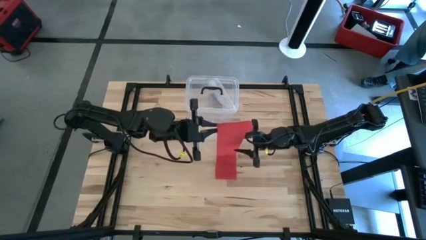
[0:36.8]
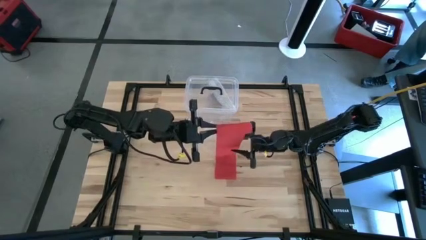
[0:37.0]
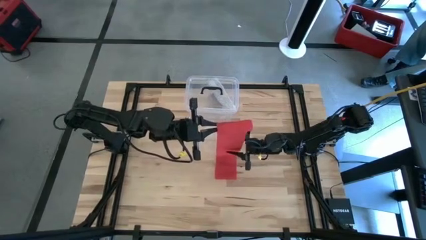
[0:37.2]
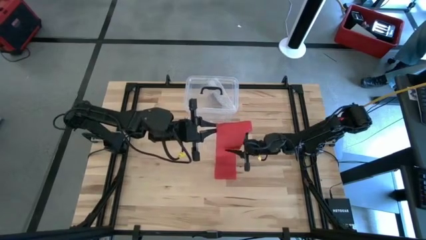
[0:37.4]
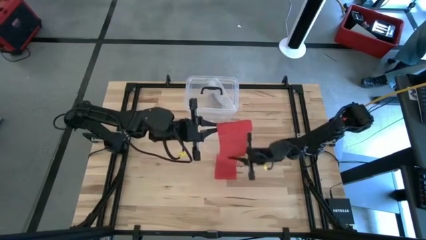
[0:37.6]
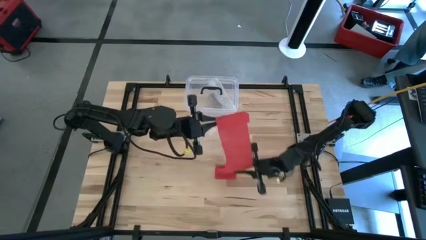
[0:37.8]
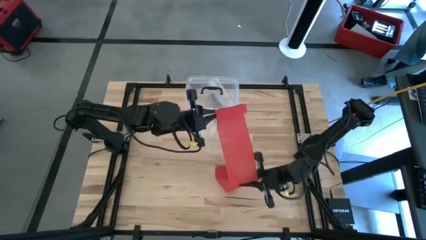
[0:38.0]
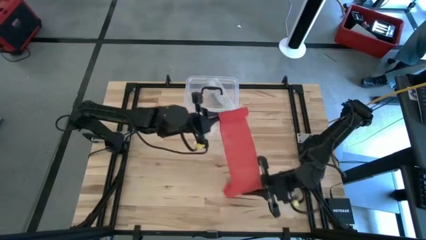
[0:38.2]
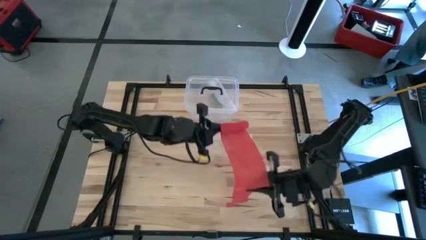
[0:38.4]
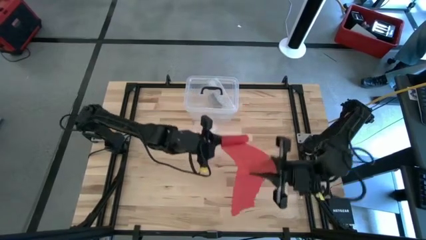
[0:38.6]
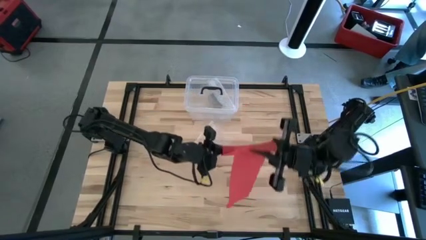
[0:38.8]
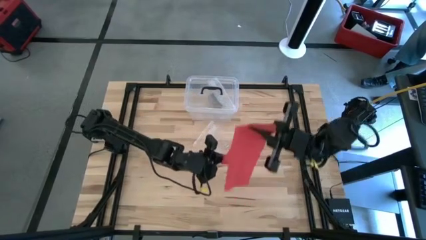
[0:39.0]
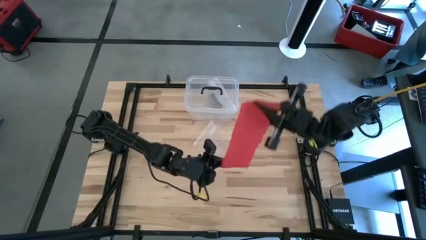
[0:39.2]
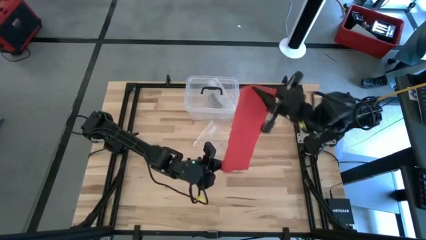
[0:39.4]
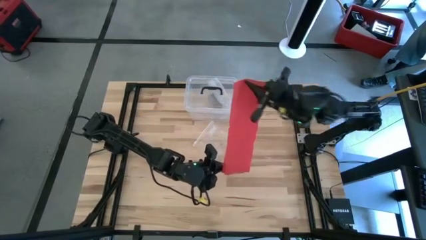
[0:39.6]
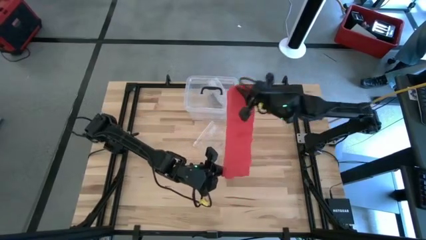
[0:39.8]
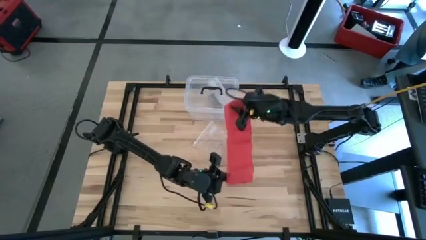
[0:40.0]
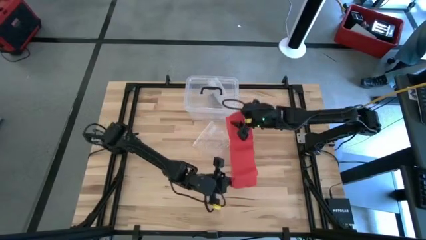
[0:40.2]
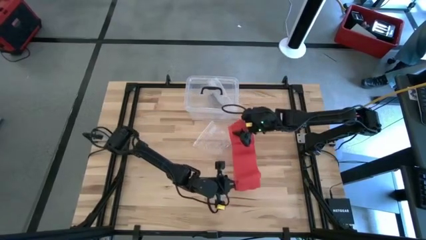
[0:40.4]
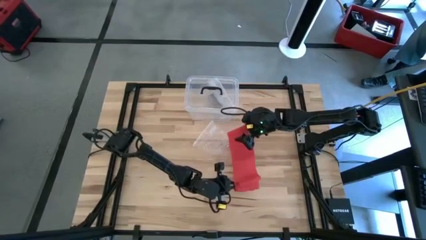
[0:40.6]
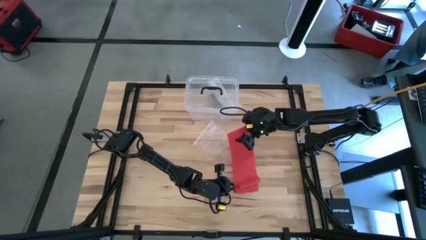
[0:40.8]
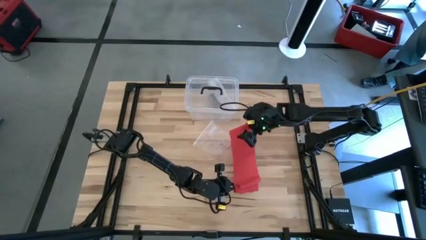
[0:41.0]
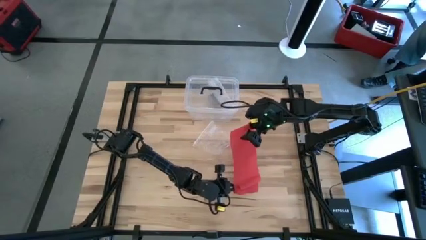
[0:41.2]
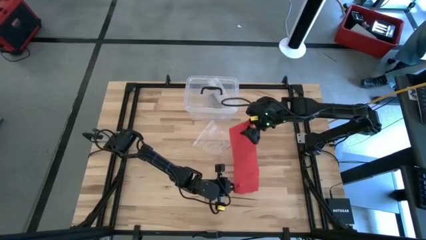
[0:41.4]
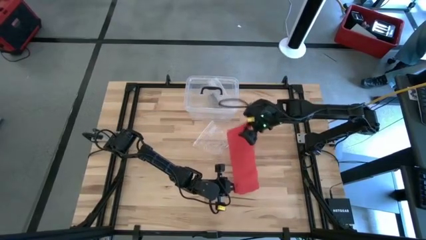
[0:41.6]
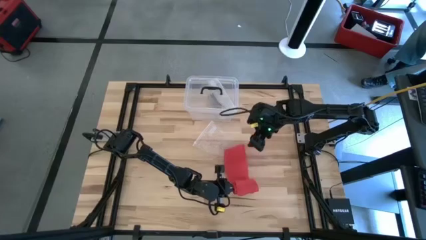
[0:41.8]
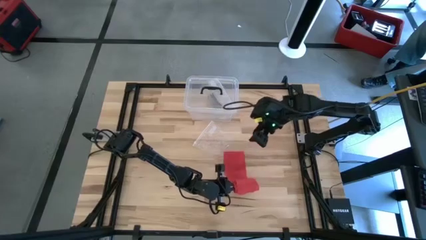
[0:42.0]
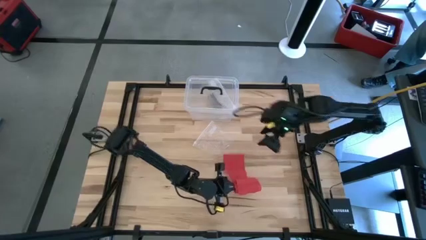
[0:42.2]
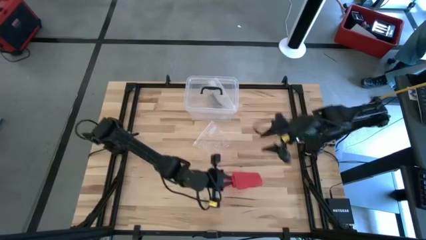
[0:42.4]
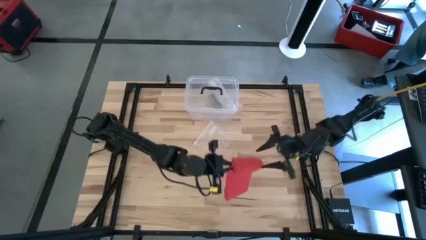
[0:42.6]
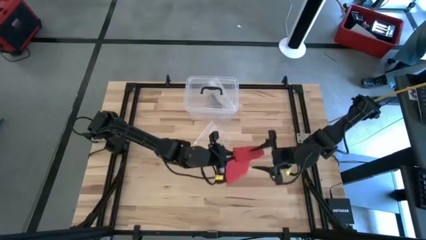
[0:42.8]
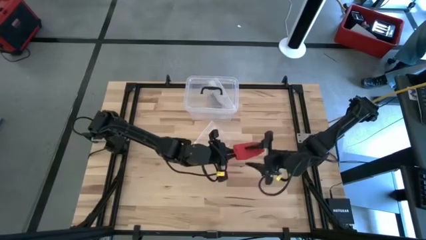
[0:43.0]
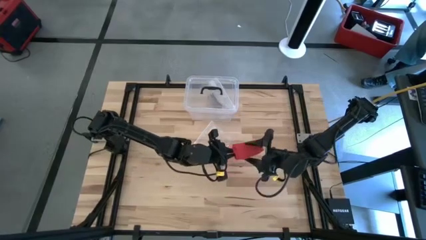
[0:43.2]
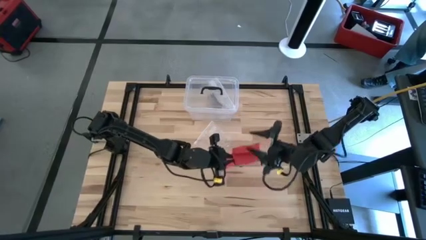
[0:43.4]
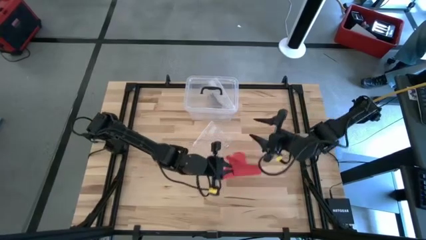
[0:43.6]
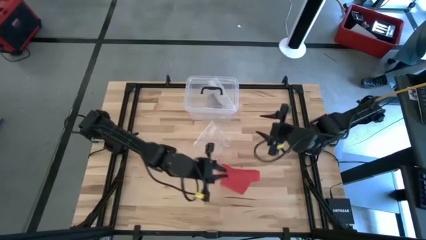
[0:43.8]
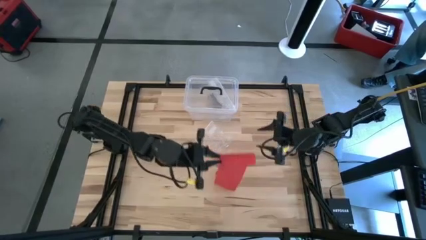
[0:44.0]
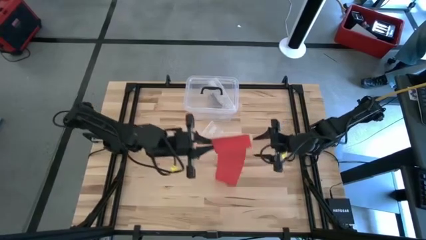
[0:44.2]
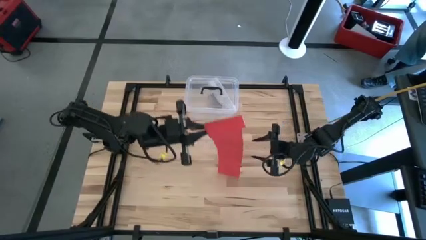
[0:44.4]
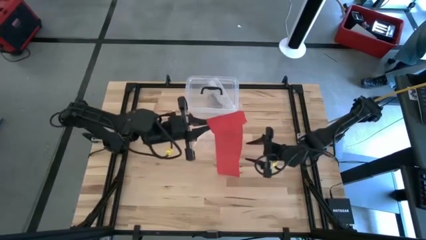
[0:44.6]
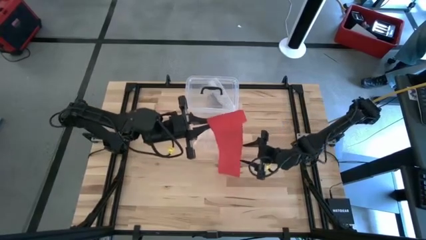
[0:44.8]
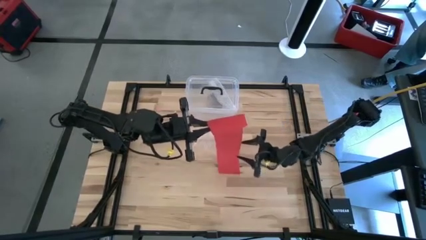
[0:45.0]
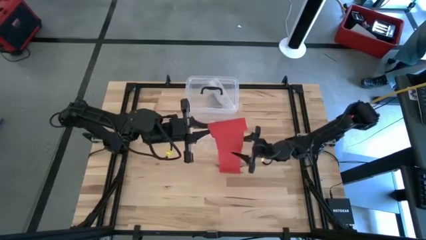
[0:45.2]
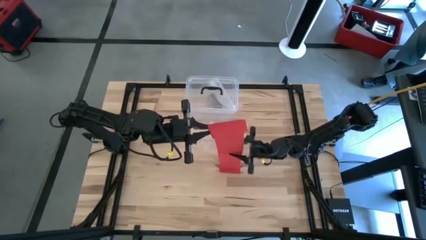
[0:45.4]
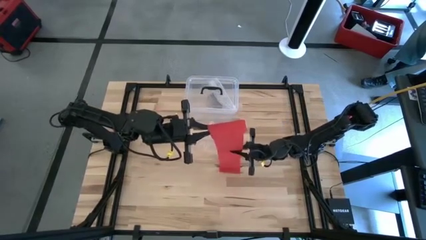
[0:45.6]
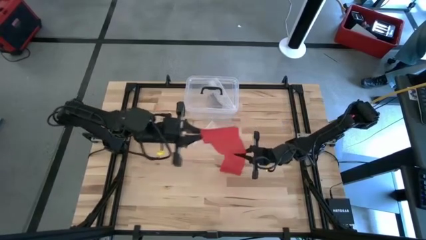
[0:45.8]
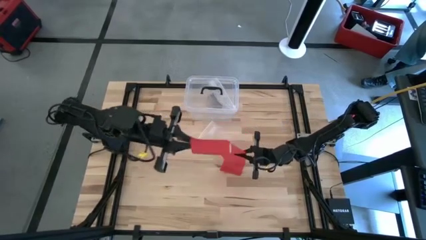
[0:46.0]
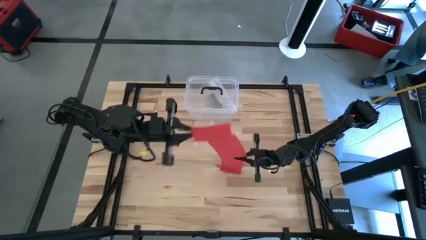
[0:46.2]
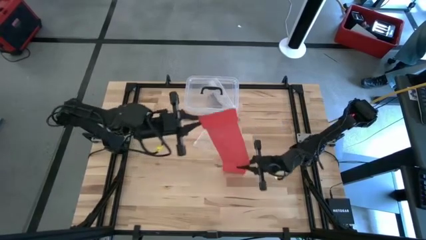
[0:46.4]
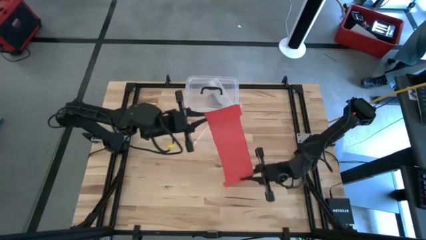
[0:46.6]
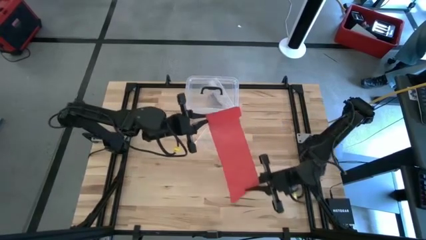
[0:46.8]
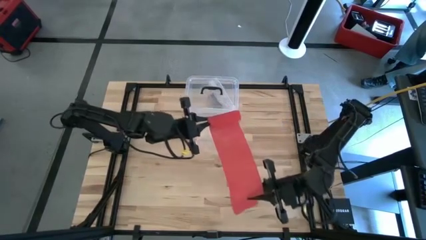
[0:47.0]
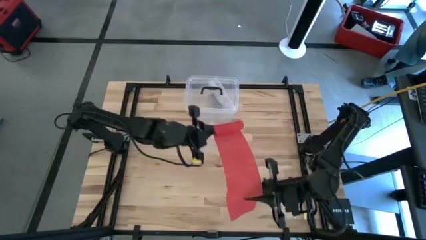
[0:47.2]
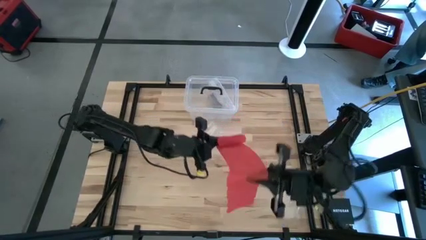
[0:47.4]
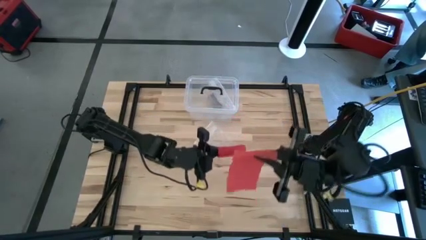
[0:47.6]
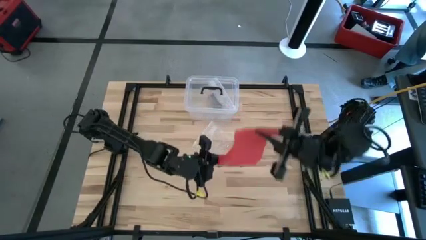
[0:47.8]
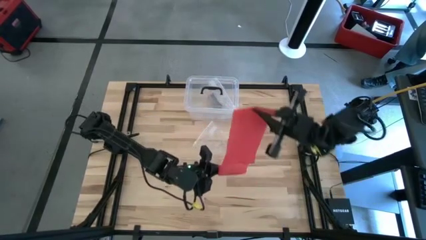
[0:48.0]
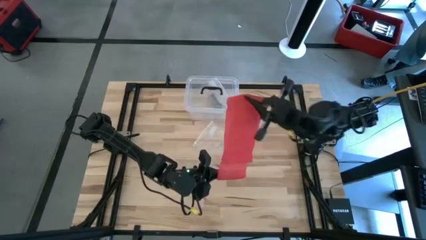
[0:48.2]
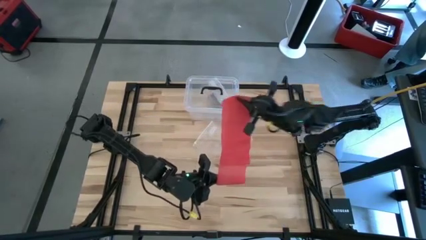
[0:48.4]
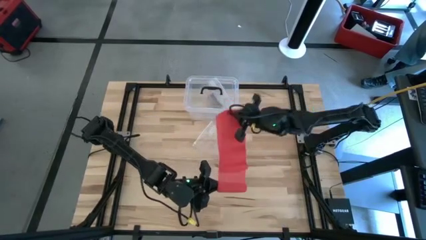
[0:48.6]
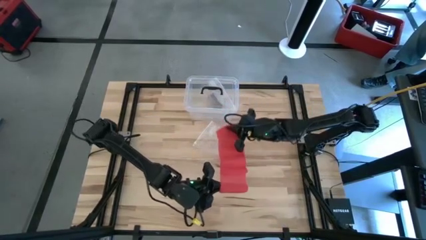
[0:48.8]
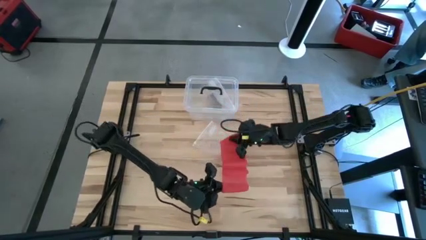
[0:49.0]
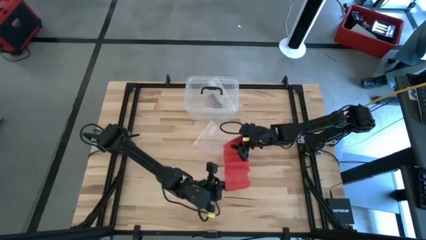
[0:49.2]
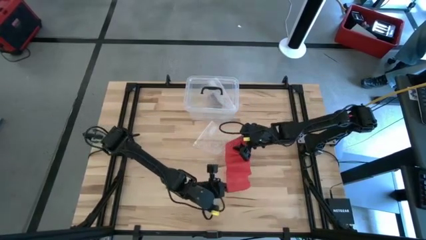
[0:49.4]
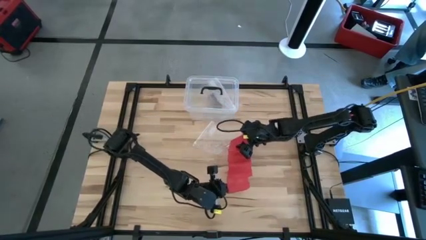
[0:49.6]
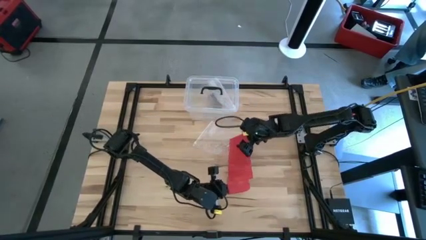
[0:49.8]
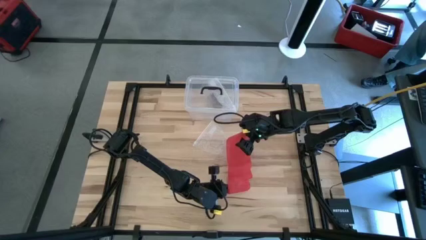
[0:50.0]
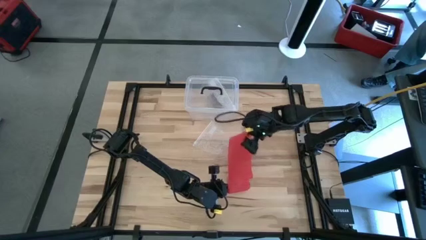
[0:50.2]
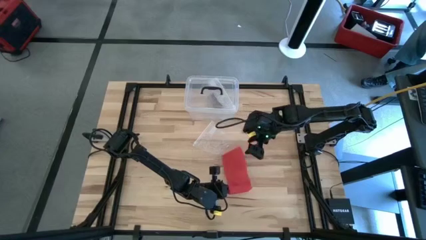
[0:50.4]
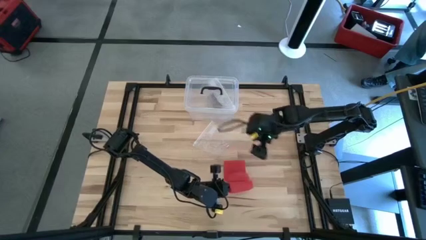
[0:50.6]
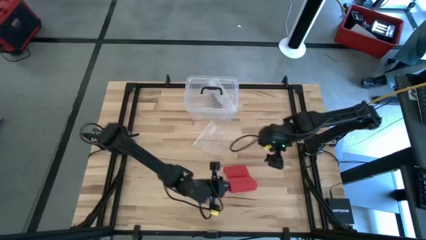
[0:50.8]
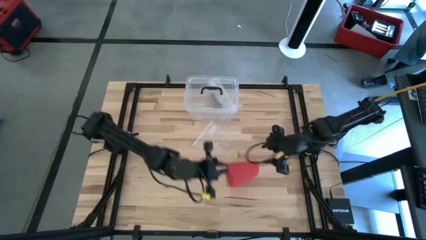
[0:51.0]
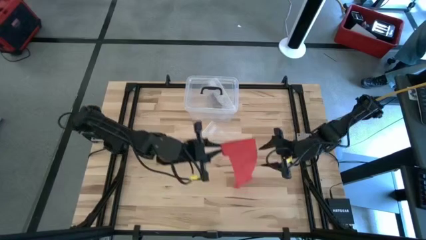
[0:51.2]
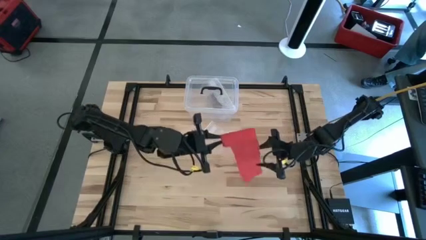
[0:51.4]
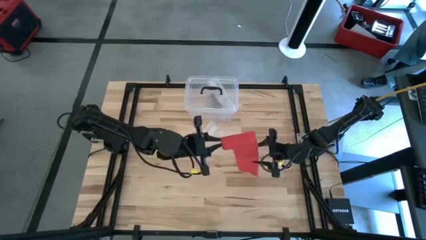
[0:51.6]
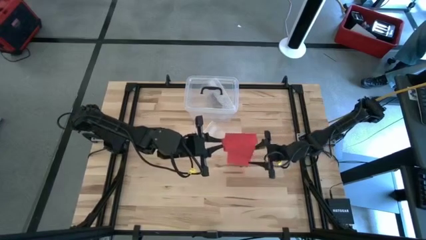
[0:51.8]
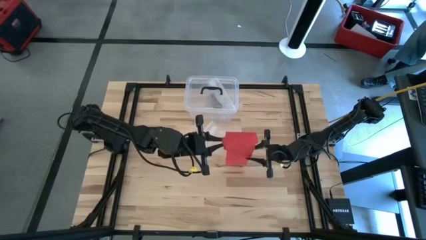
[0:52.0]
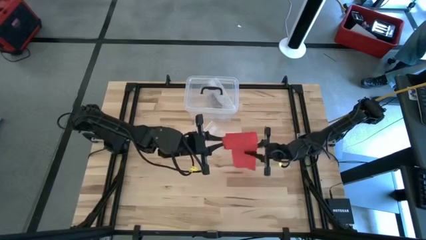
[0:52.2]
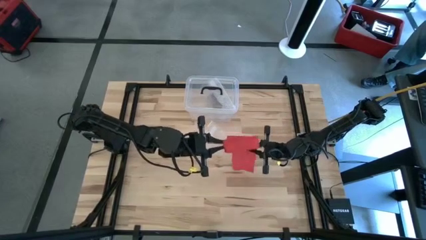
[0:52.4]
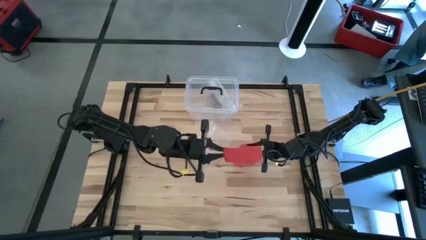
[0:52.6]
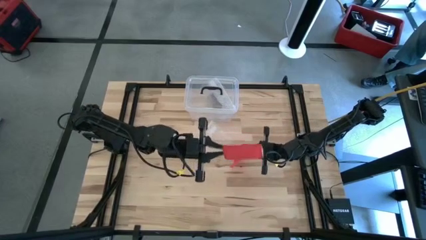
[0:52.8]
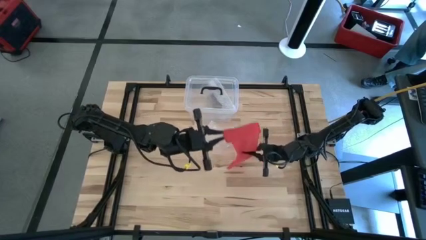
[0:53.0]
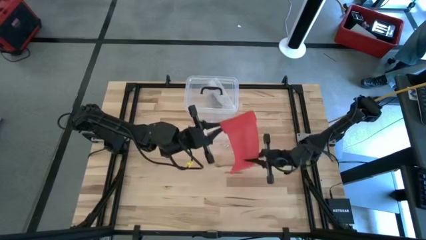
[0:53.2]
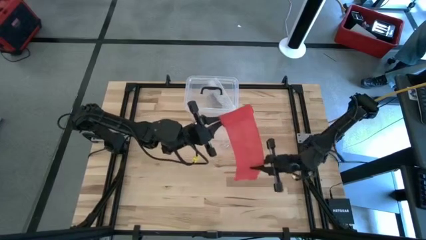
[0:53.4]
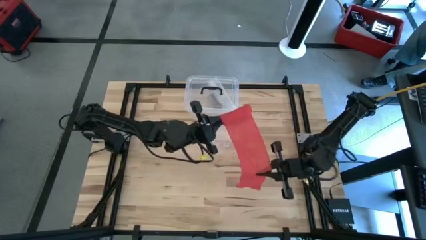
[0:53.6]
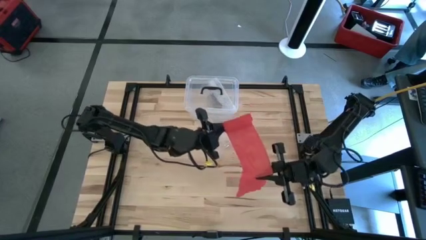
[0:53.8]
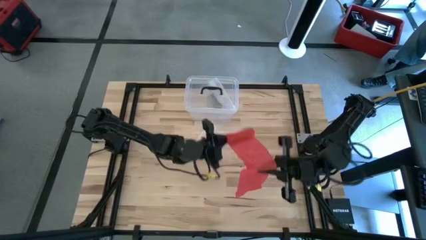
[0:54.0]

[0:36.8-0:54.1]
Task: Roll bandage
Roll the red bandage
